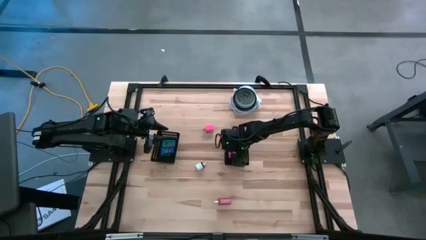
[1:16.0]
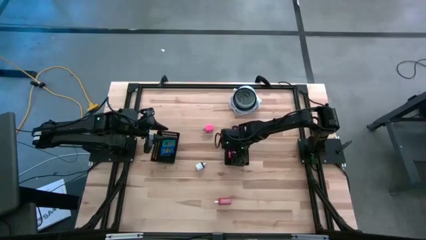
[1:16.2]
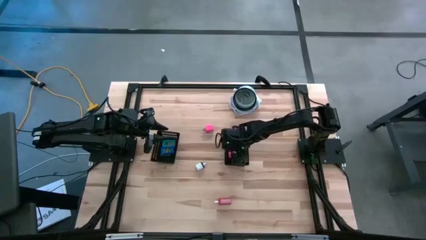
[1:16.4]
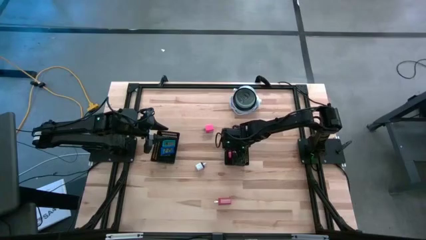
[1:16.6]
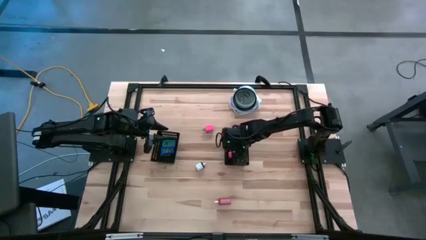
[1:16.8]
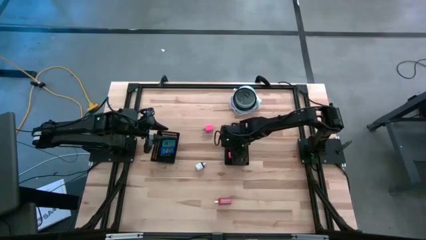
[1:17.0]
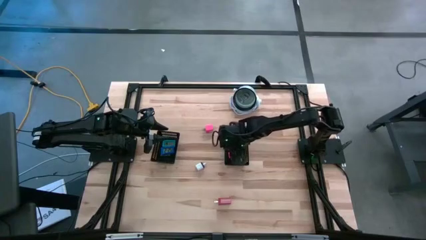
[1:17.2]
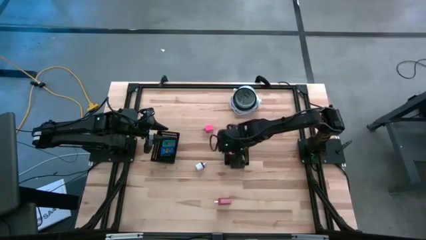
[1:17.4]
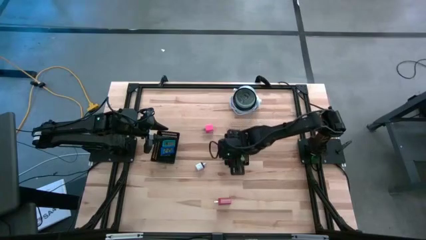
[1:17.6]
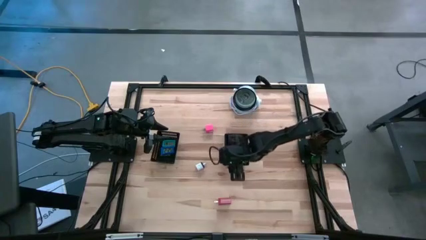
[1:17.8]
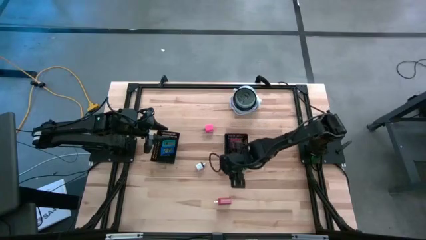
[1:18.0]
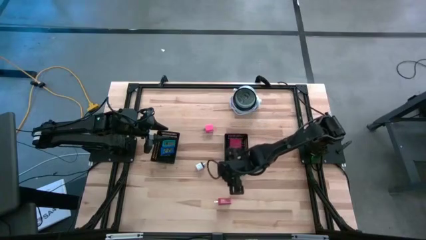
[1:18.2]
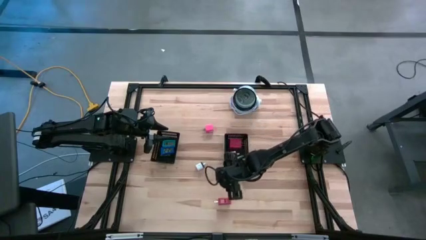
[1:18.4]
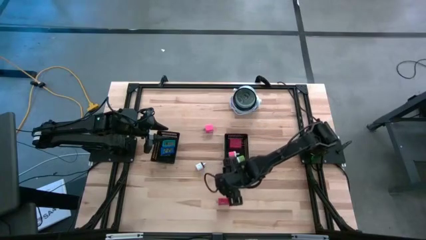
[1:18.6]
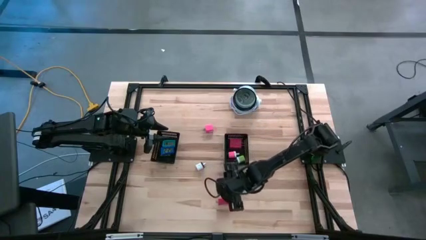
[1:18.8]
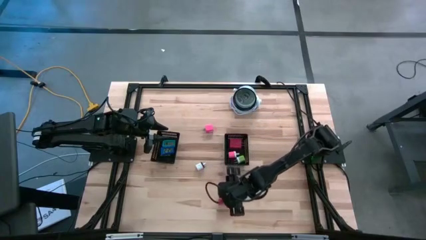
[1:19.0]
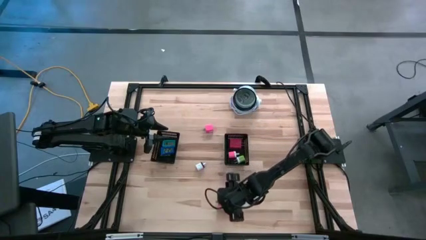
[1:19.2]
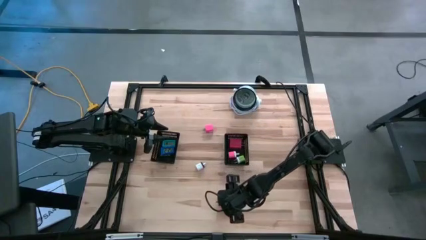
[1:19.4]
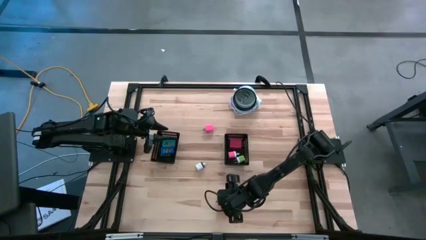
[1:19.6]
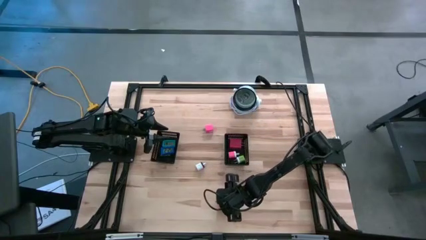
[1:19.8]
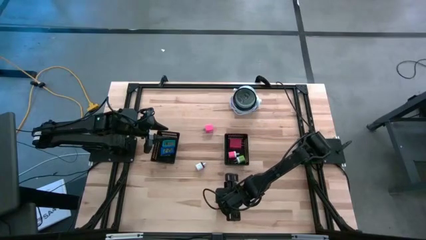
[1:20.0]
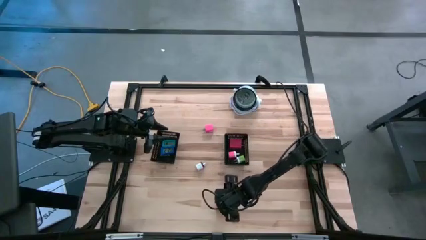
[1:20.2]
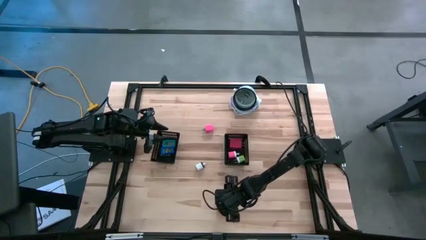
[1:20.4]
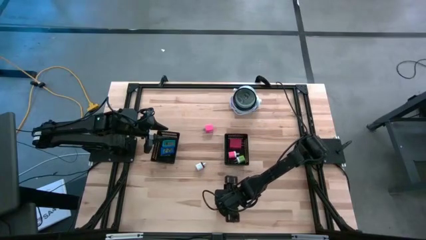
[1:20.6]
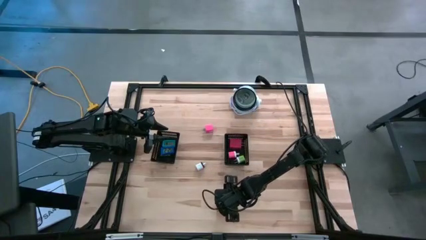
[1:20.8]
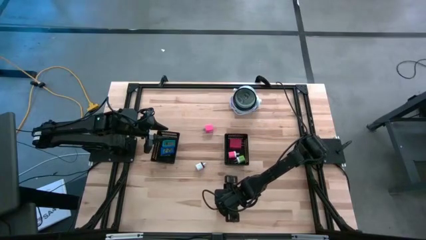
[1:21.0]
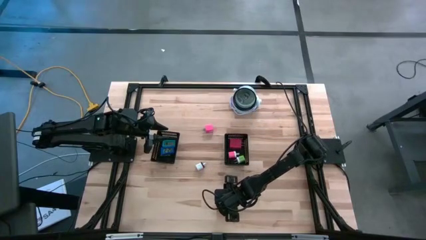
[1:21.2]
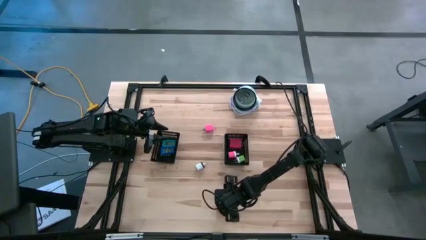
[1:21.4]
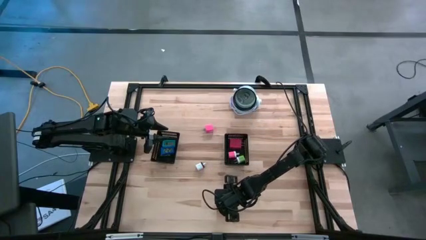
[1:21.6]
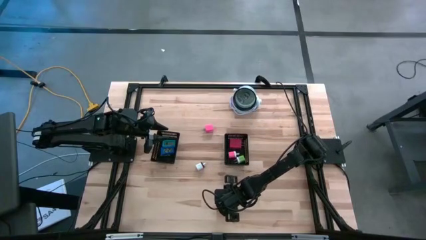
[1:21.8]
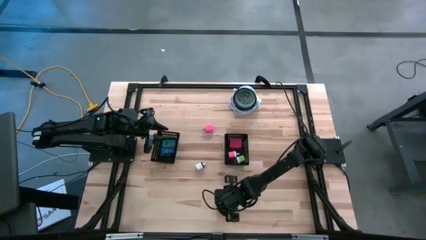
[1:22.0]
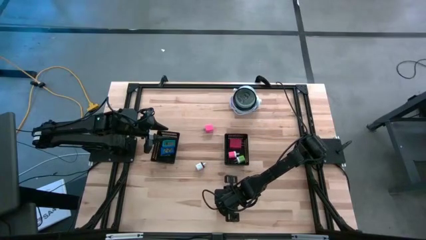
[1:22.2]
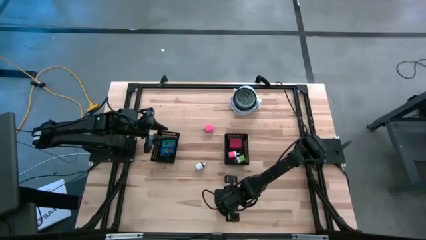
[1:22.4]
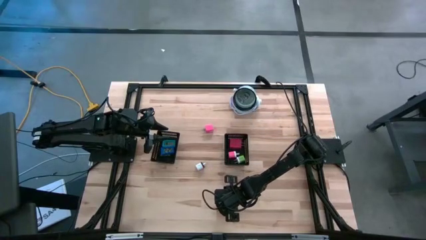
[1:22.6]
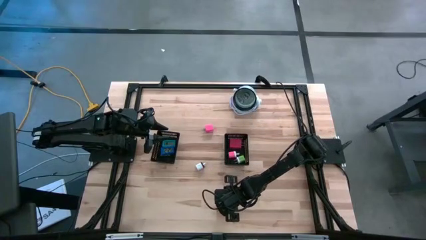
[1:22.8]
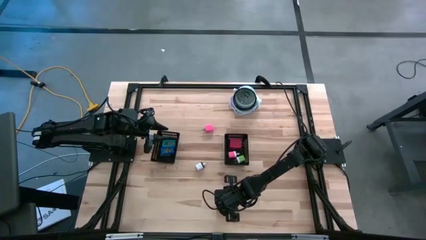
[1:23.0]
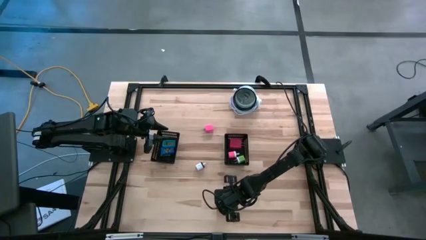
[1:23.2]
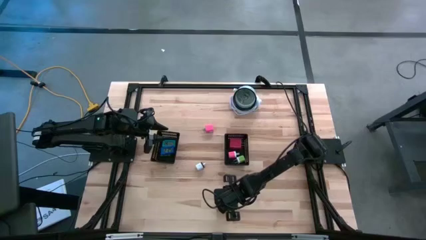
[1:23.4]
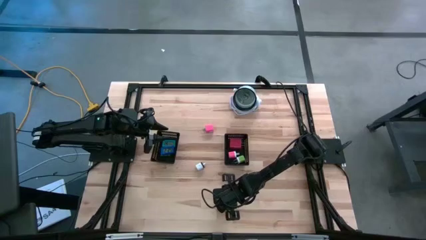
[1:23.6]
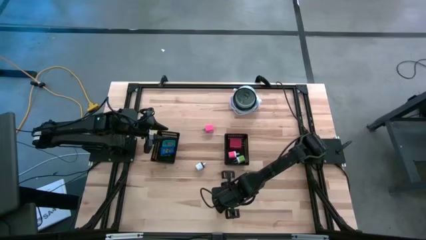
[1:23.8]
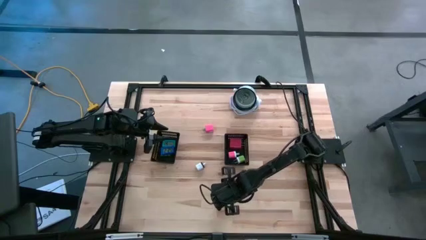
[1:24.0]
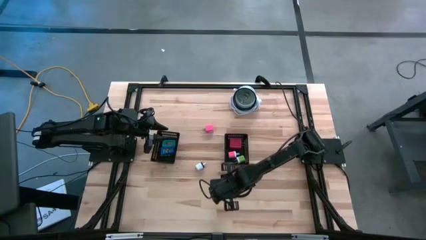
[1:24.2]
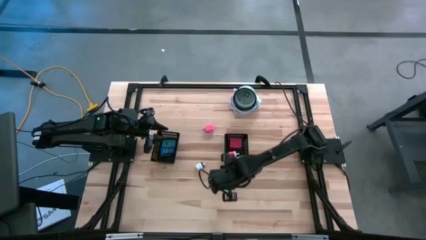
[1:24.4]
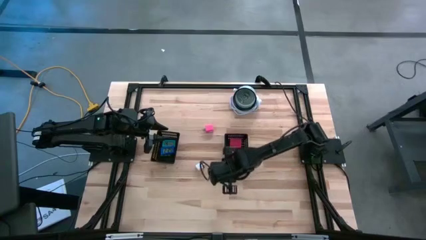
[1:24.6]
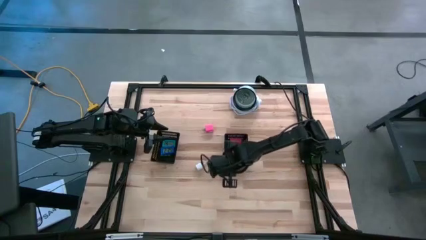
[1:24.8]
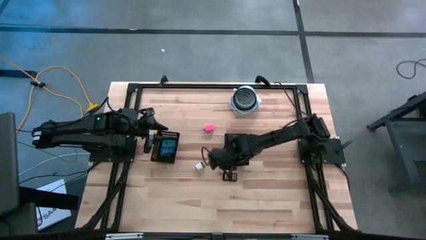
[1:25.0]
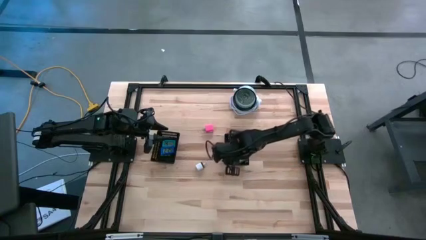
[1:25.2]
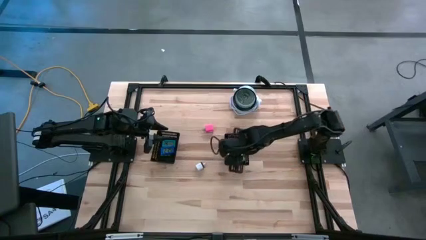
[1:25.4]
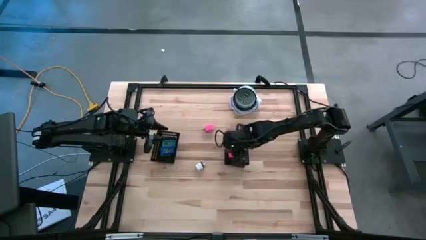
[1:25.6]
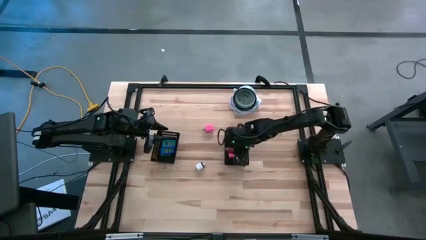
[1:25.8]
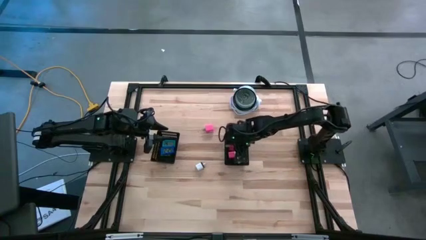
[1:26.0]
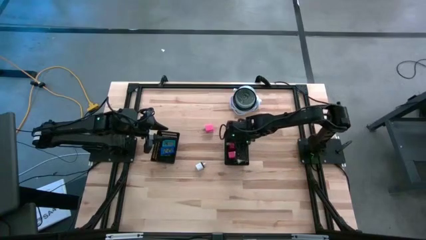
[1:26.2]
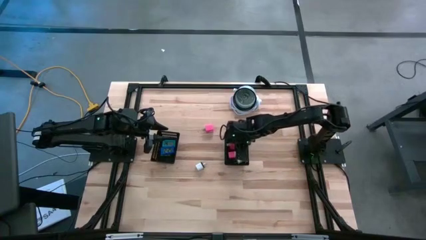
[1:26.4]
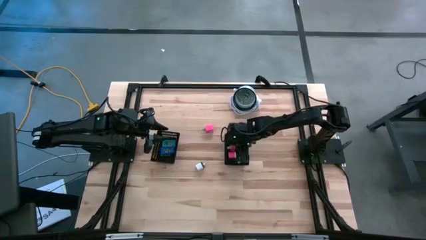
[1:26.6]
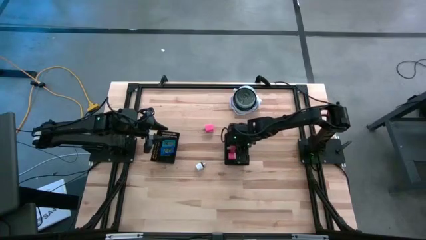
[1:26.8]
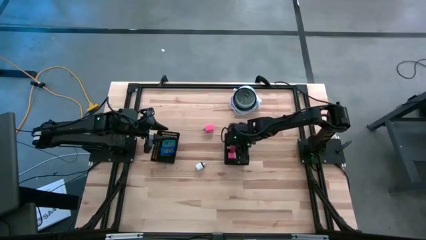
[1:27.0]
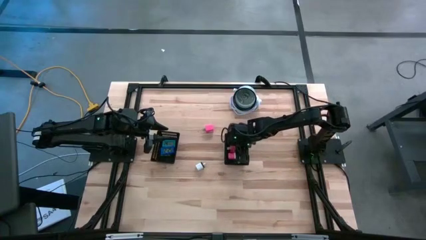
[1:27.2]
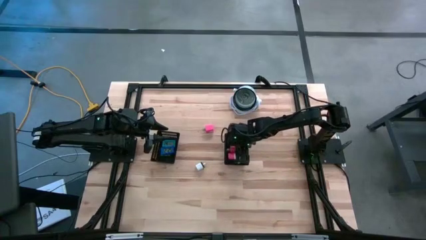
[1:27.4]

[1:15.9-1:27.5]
Task: Pick & Place Office items
Put the red charger adapter into the right black bin

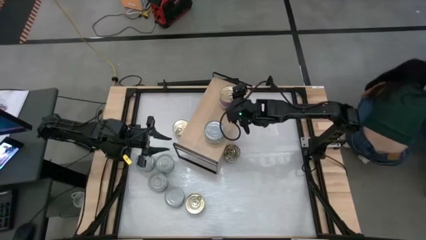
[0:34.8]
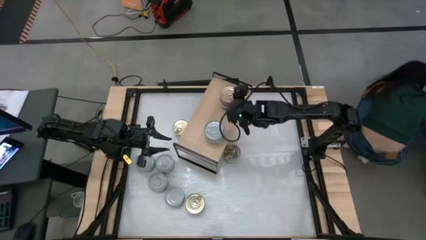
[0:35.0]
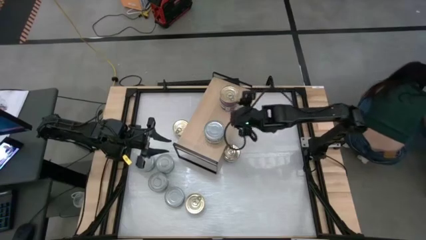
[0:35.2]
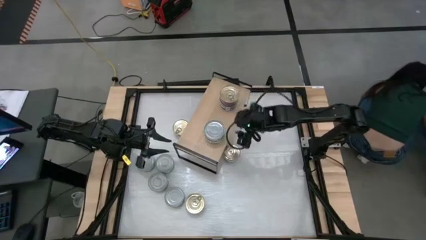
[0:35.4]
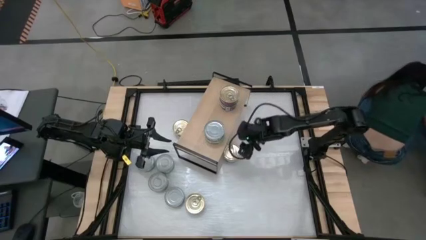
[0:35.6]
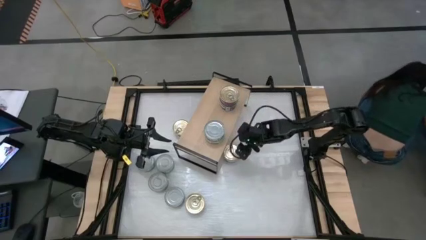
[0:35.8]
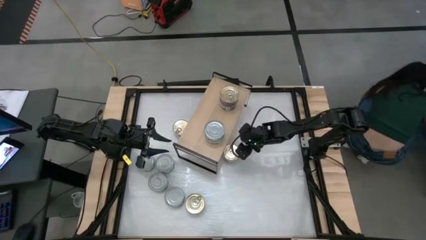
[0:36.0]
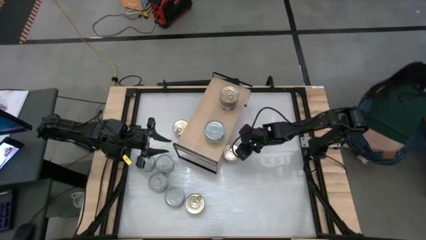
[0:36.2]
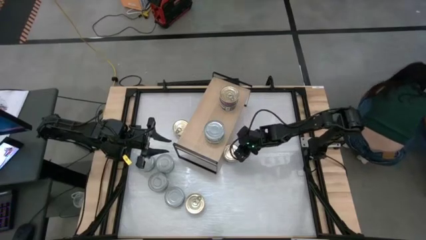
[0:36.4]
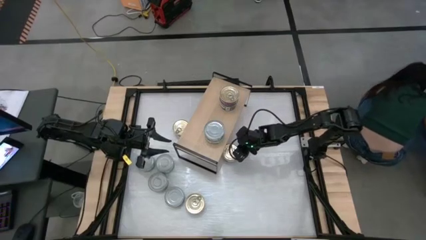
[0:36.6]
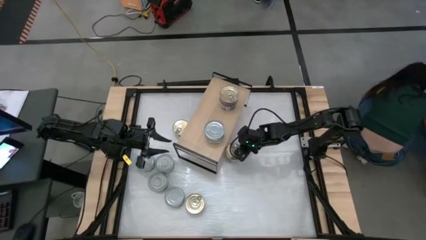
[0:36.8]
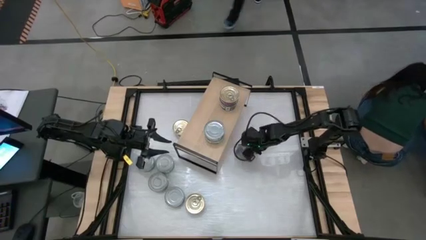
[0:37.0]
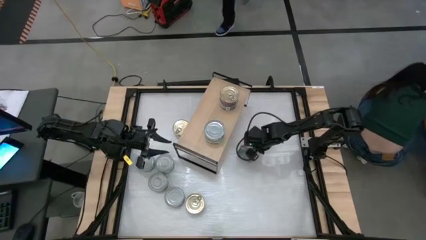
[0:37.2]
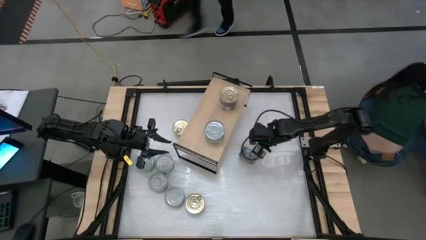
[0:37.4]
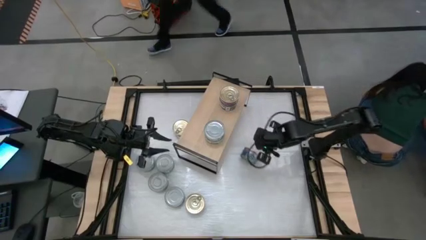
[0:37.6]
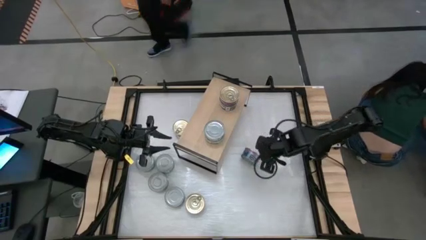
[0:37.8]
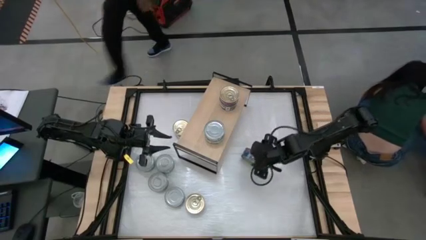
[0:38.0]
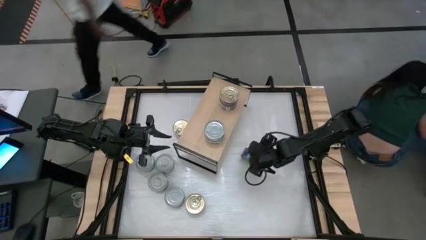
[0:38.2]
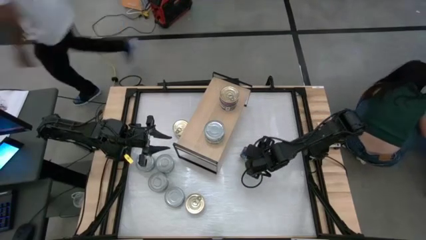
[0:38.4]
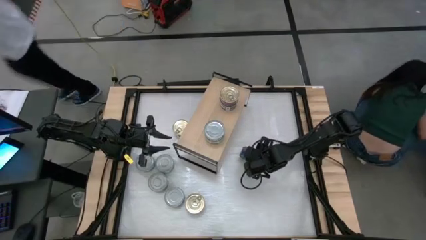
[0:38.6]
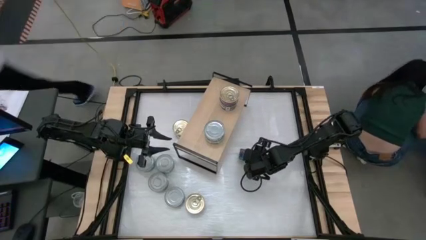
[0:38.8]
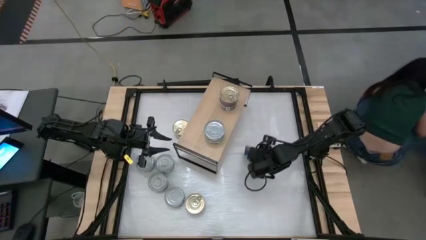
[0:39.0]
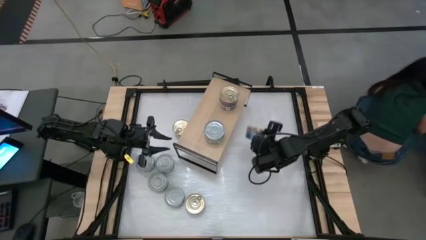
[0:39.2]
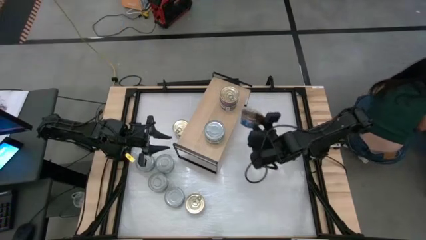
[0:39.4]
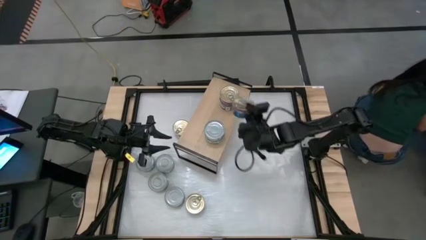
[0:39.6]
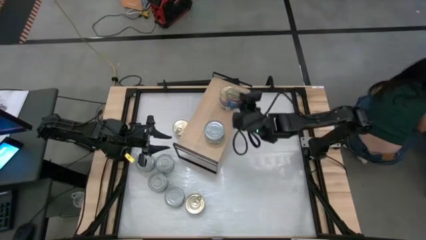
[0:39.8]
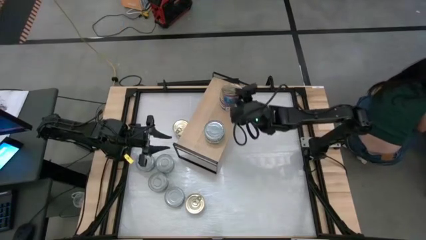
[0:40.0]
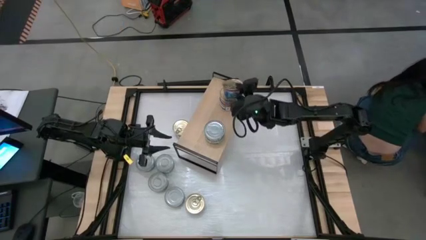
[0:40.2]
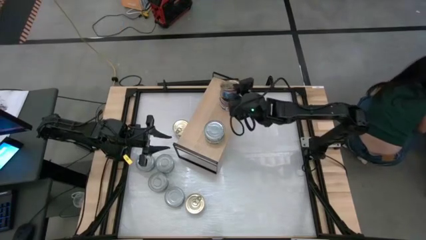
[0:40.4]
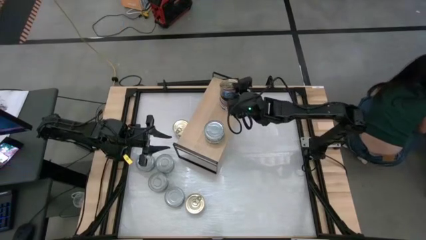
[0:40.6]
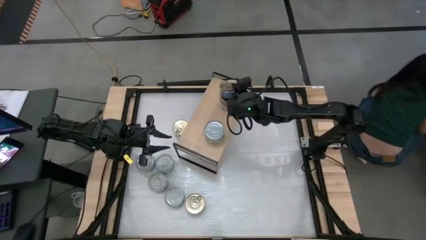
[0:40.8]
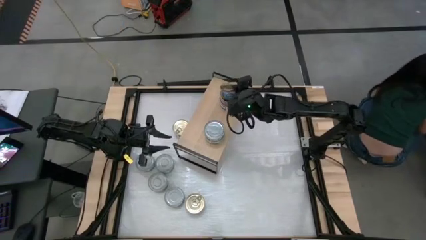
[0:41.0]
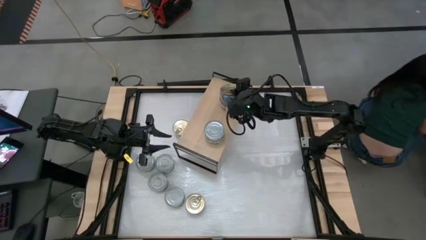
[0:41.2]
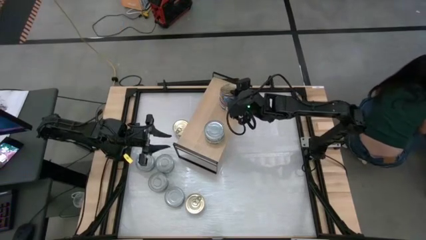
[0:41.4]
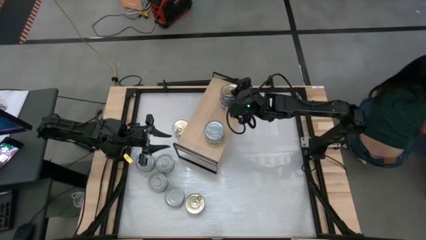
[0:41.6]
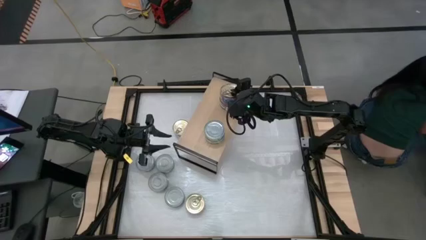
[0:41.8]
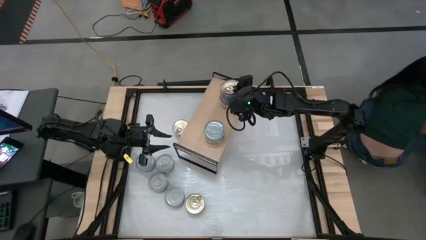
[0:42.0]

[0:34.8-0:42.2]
Task: Stack canned seafood by type on shelf
Stack the blue tuna can on top of the other blue tuna can
